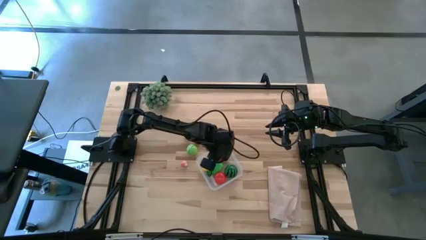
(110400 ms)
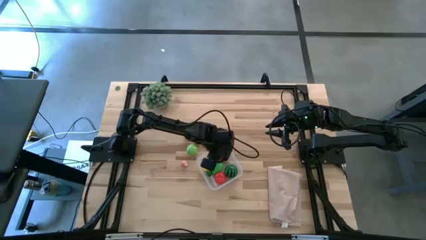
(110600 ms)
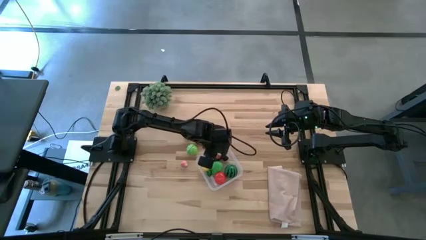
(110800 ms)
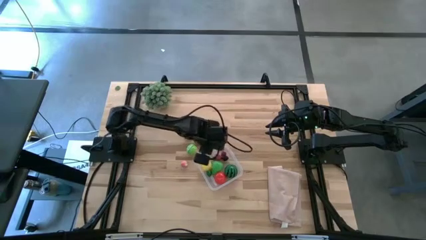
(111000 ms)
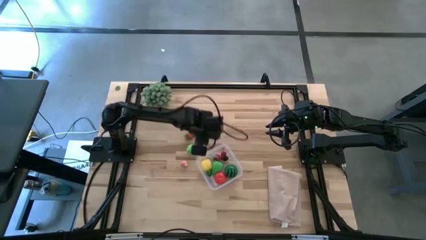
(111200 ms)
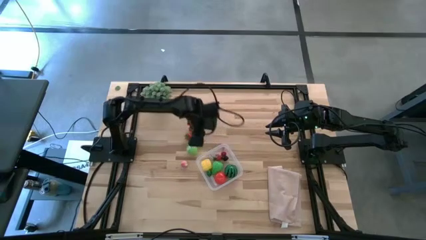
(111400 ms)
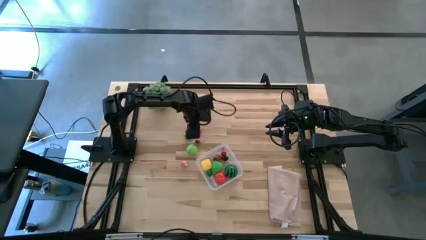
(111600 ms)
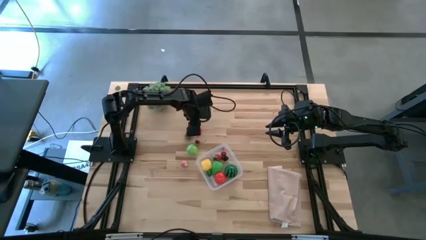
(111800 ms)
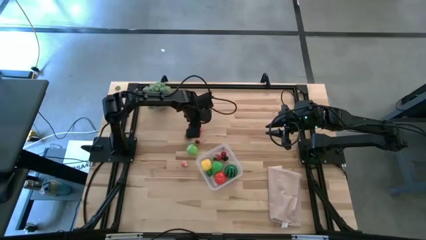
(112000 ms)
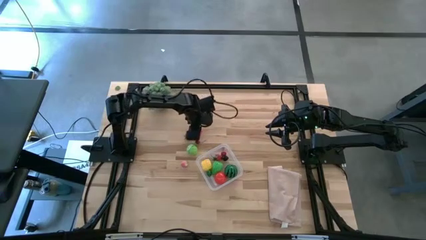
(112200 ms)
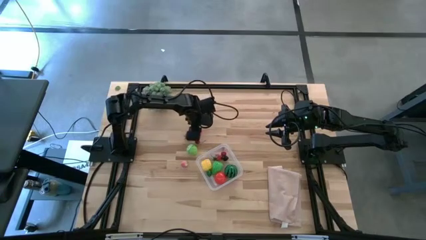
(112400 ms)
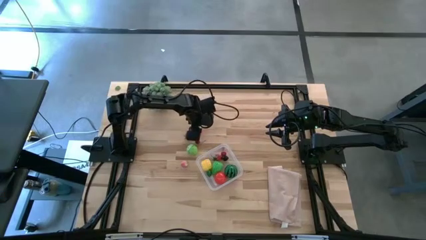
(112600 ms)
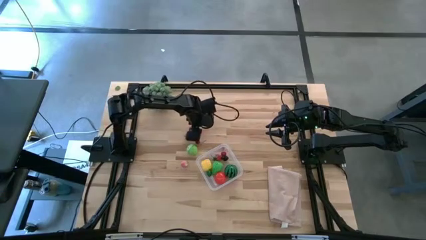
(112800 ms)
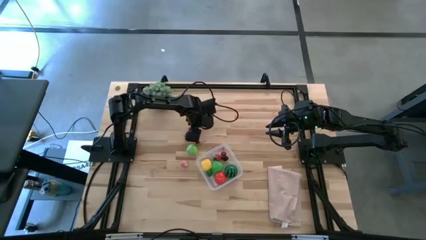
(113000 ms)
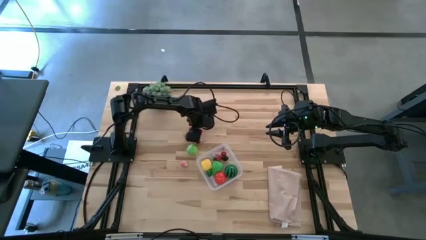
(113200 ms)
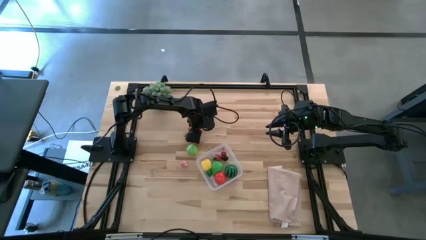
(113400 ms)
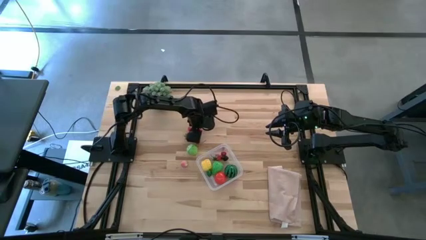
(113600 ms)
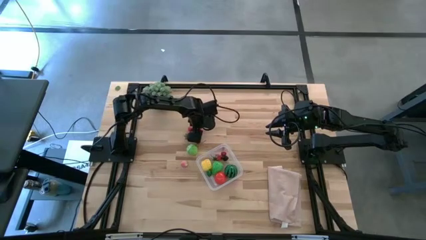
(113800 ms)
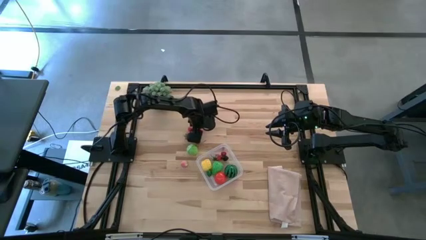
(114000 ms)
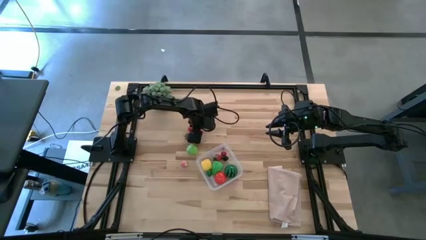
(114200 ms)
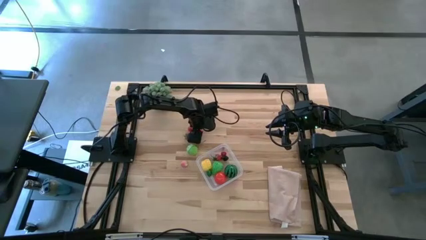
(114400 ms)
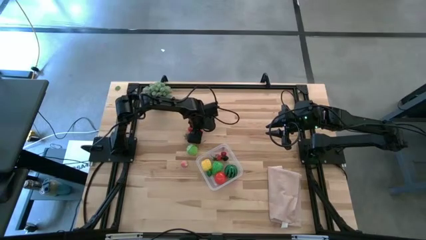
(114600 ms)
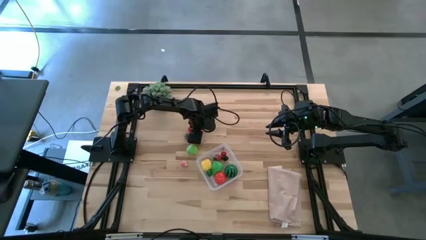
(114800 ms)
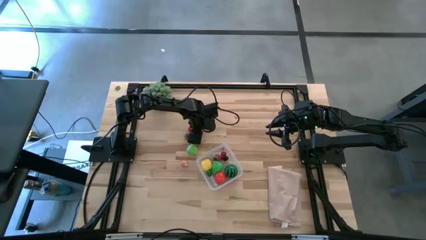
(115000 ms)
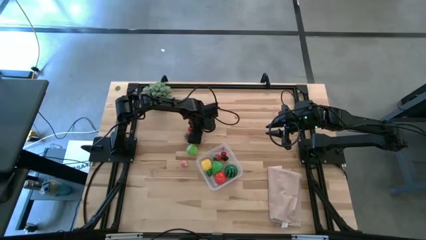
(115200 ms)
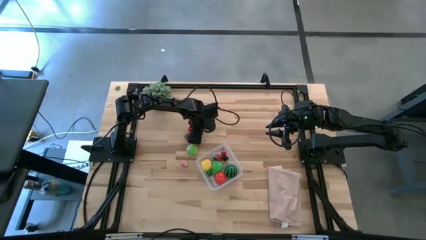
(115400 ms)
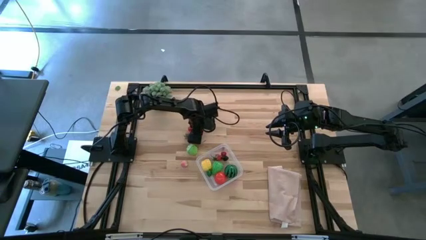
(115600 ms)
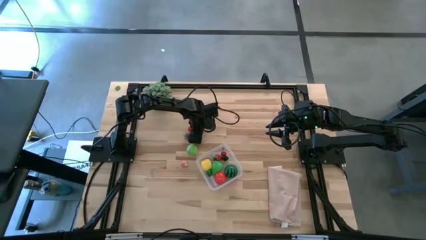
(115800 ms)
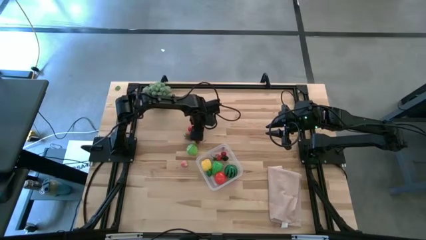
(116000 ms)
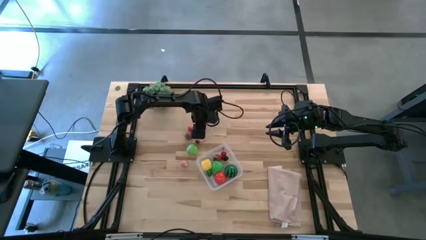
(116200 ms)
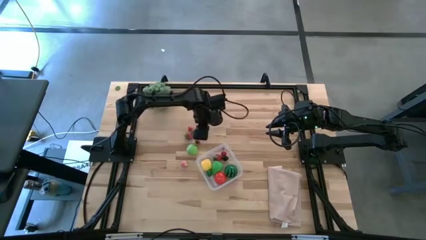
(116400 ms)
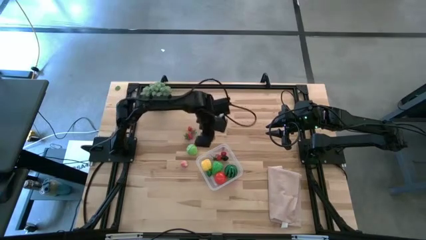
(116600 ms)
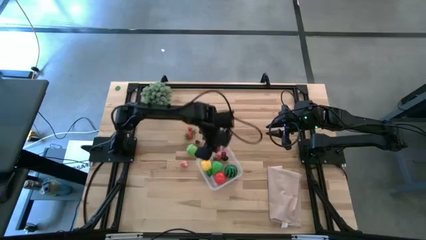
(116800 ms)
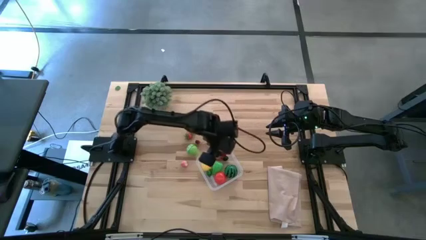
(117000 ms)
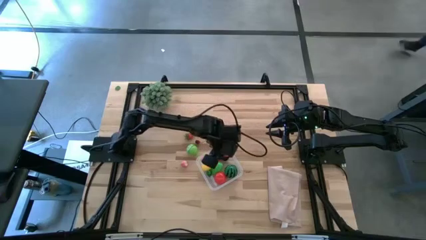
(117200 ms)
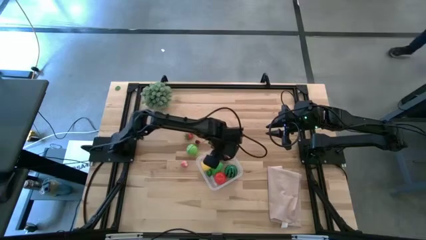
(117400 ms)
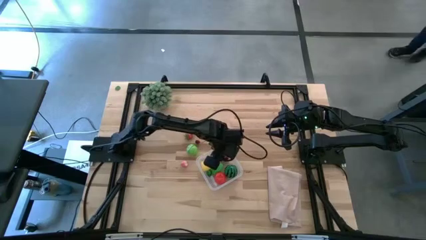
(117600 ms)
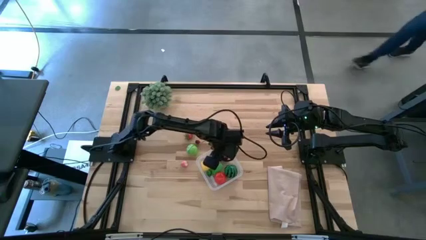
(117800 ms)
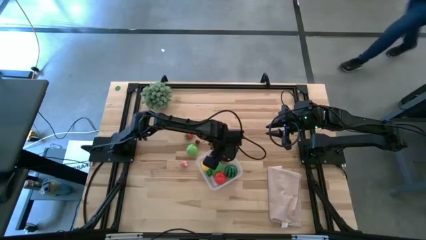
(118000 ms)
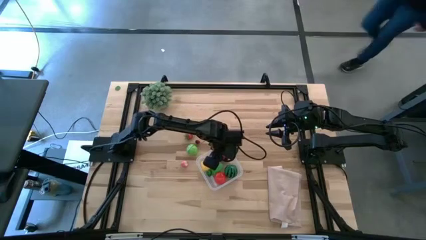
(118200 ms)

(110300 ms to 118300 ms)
Task: Pick and placing Produce into tupperware
Put the red cherry into the transparent bin

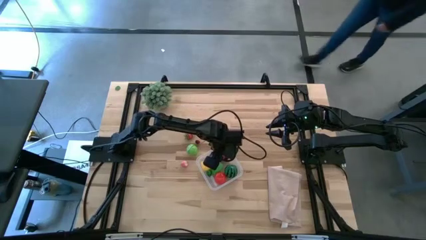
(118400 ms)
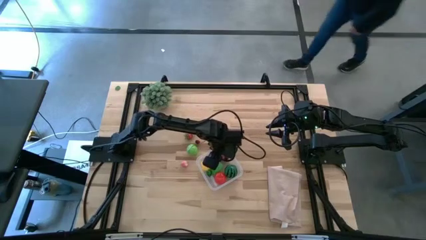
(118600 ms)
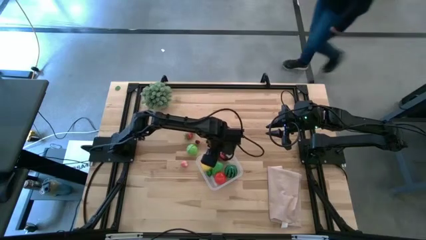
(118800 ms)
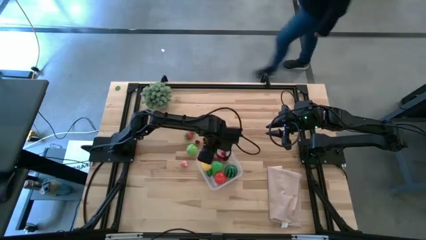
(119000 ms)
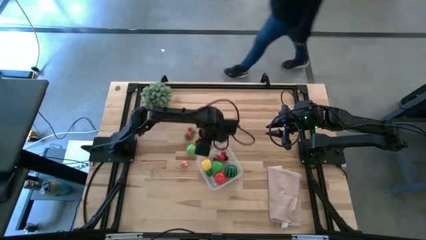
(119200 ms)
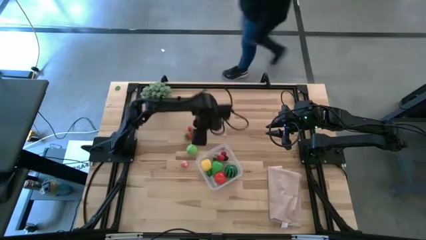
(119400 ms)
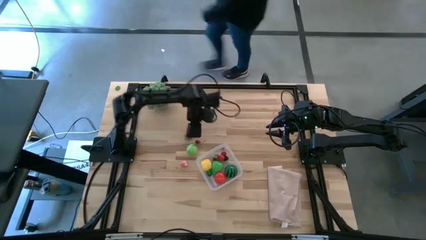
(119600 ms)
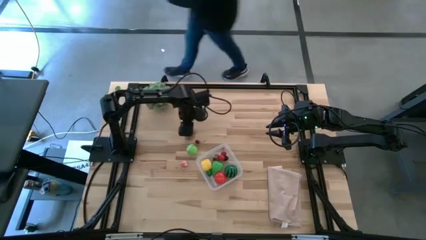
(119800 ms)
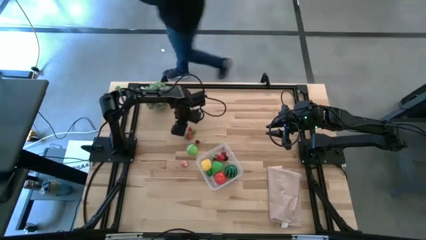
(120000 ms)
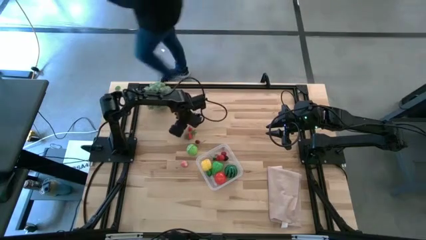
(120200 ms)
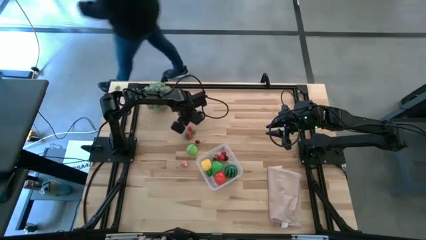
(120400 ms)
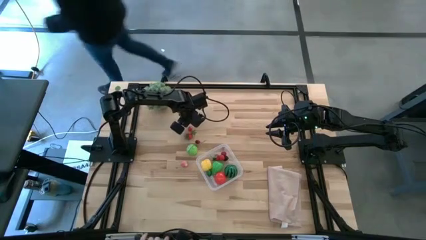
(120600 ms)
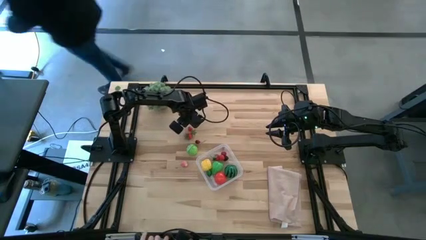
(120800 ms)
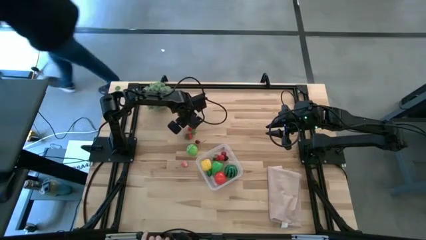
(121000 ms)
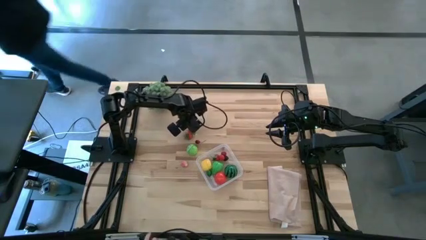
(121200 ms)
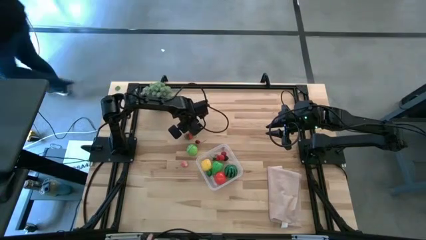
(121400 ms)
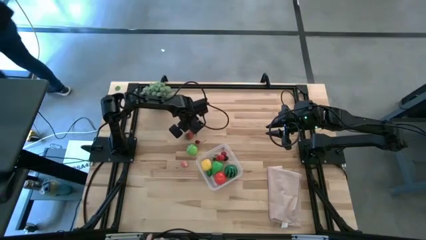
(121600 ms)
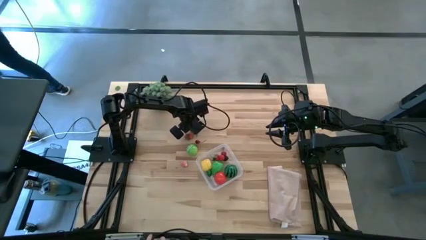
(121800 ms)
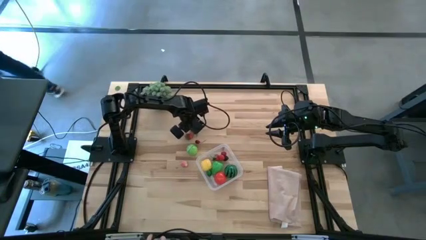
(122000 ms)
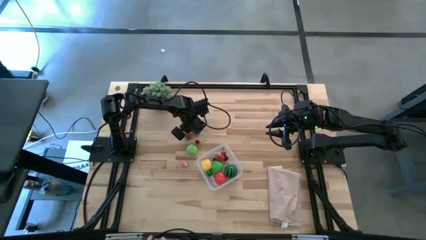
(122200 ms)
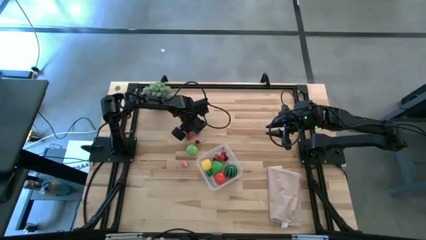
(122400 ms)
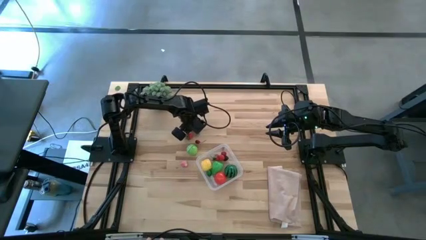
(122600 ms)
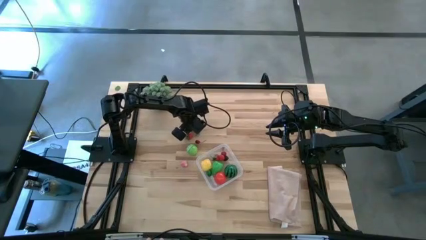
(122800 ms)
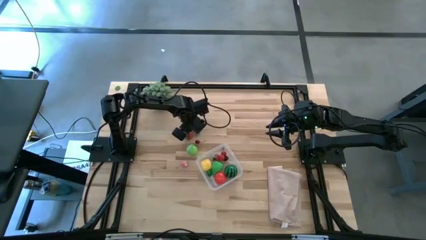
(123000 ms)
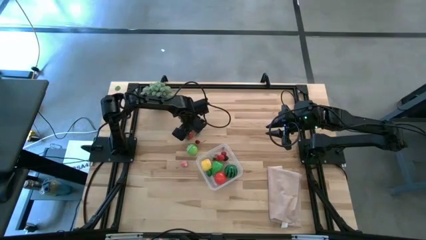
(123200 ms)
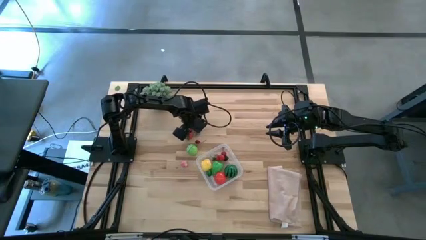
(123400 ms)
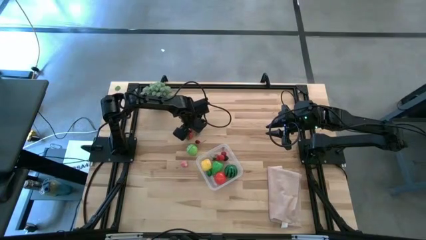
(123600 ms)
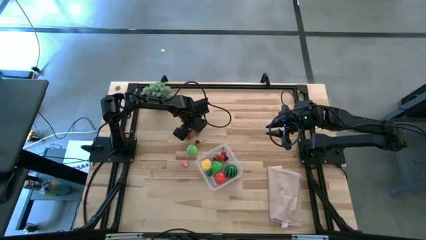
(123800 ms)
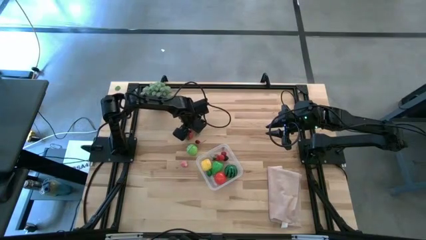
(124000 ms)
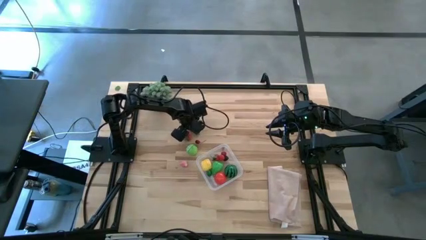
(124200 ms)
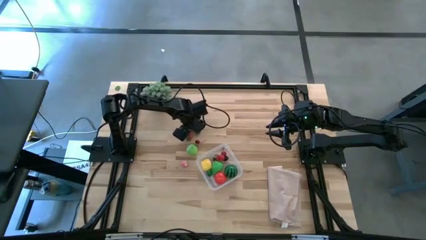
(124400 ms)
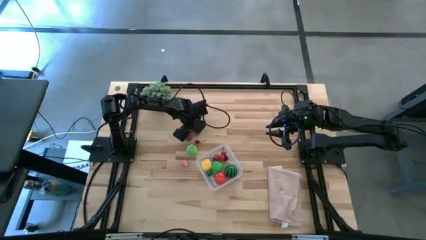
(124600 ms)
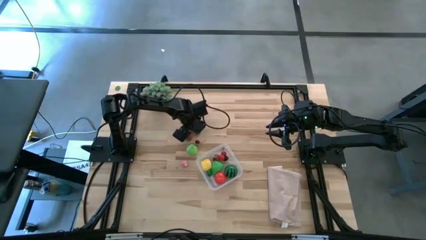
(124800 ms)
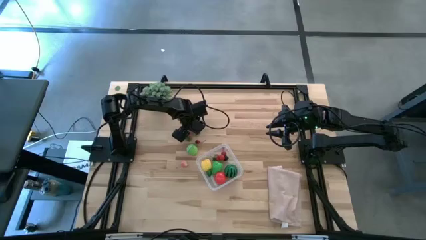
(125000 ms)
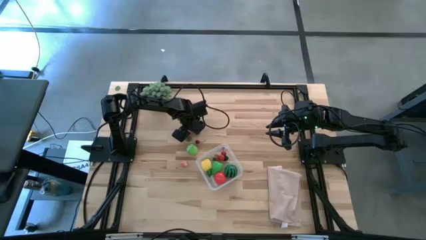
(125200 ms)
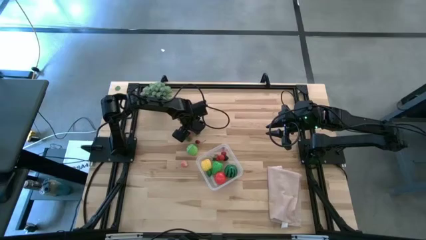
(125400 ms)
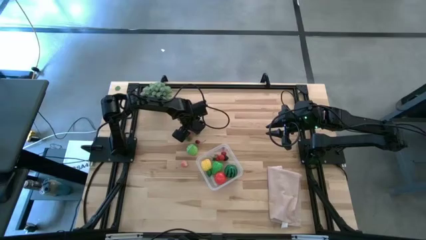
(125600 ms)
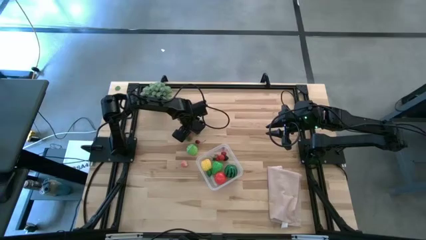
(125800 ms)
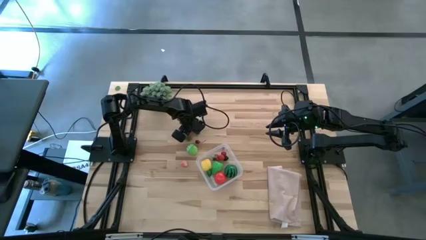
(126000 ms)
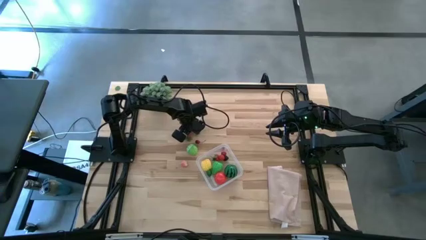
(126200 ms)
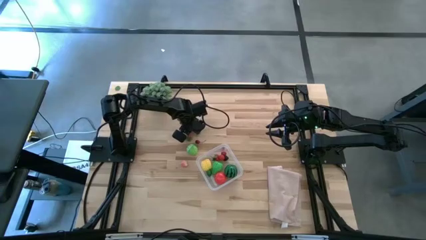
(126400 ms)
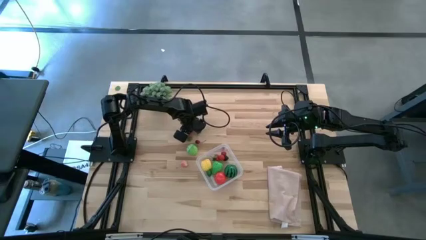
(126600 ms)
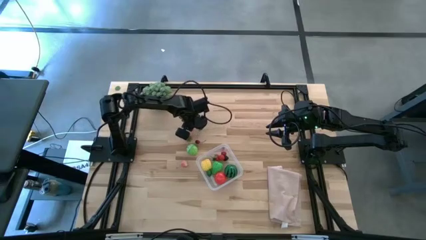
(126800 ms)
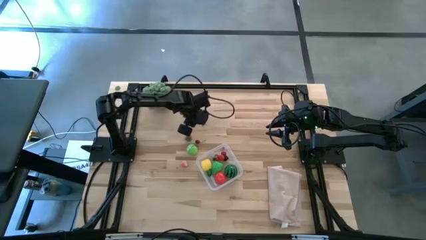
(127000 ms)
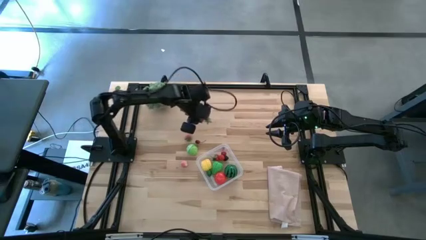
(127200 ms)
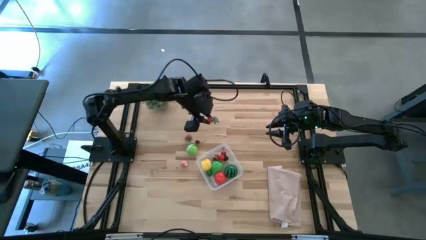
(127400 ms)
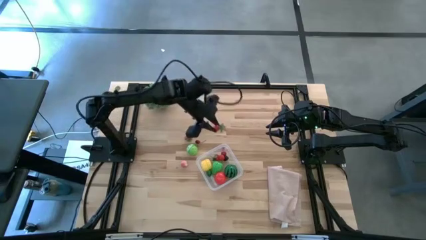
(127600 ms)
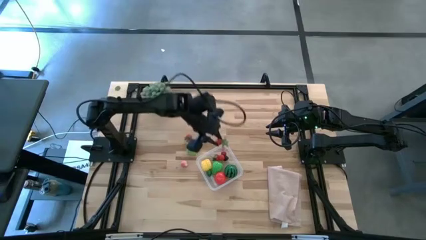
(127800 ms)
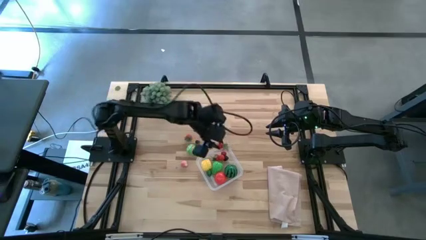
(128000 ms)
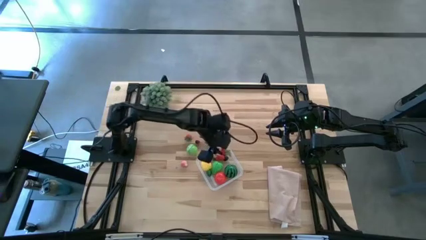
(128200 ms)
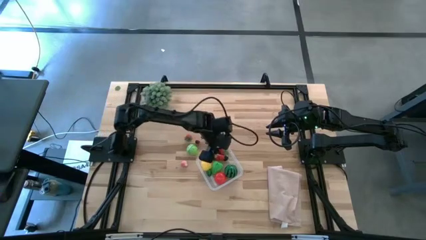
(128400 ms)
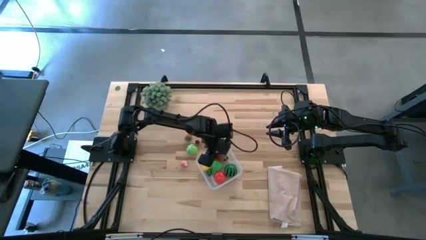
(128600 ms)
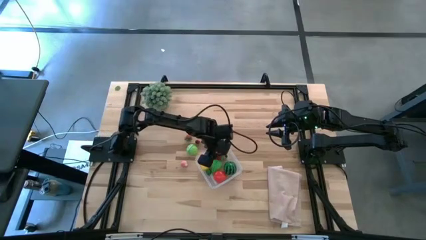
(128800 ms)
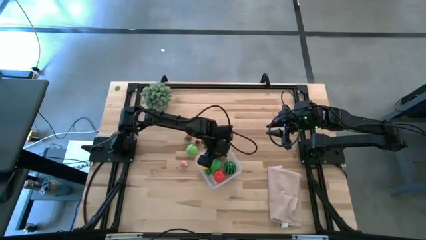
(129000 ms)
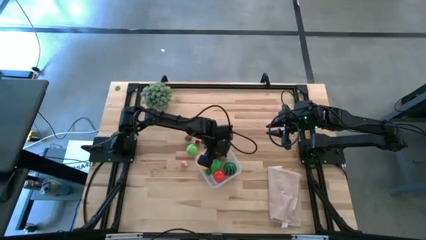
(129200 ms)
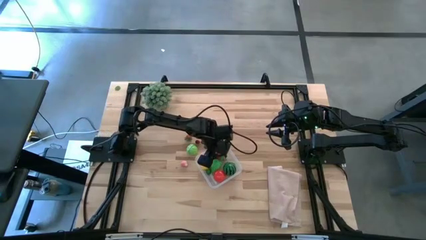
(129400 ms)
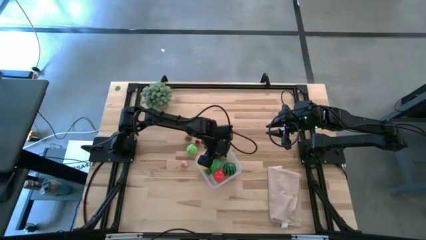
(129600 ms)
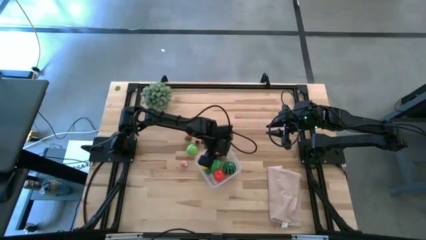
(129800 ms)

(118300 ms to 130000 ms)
Put the red cherry into the transparent bin
